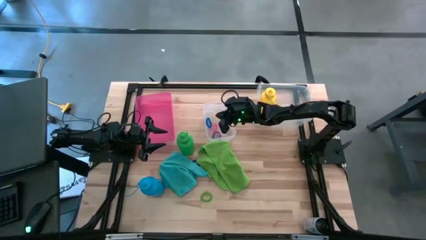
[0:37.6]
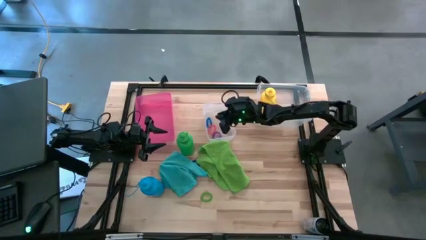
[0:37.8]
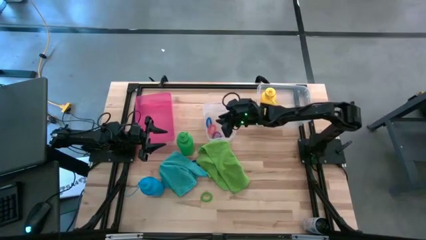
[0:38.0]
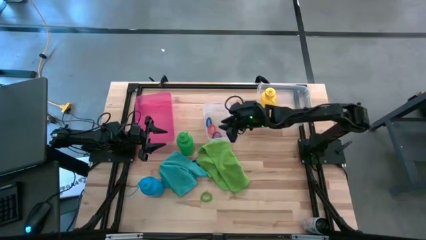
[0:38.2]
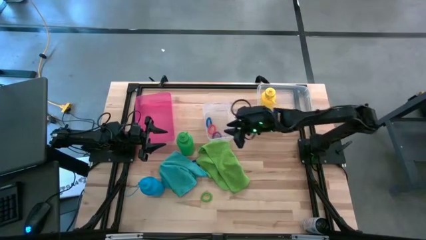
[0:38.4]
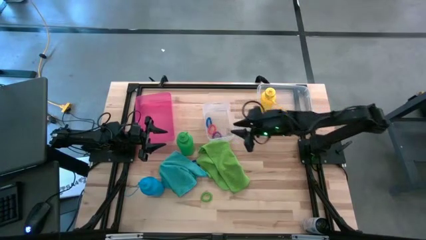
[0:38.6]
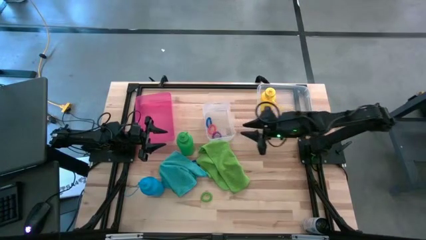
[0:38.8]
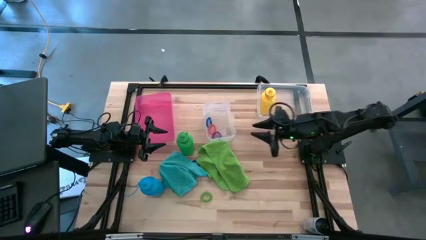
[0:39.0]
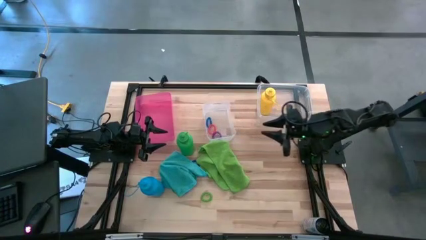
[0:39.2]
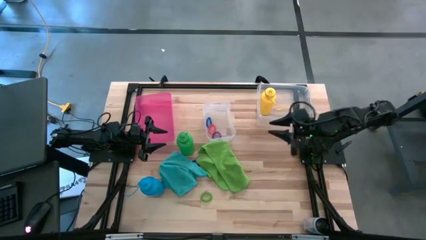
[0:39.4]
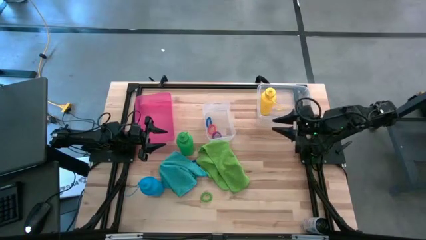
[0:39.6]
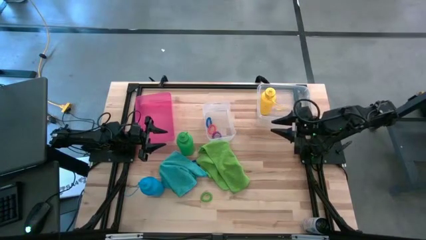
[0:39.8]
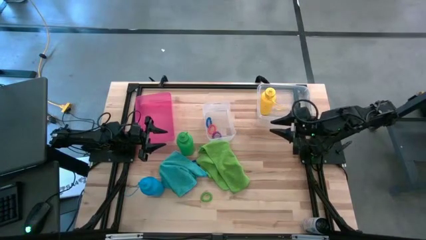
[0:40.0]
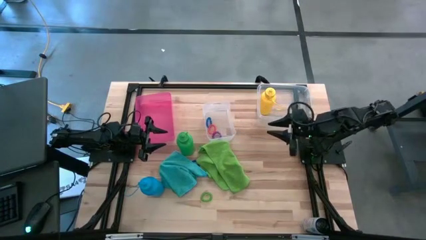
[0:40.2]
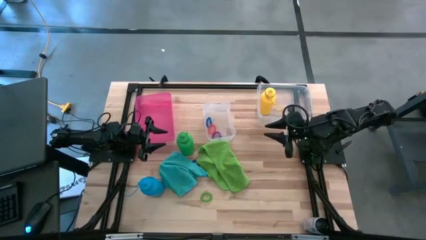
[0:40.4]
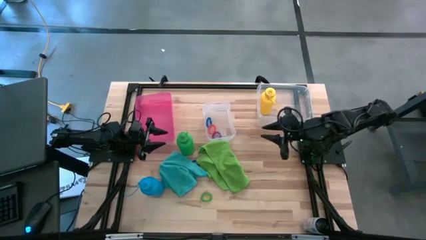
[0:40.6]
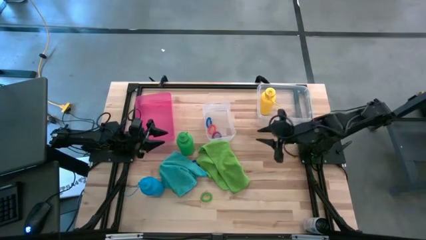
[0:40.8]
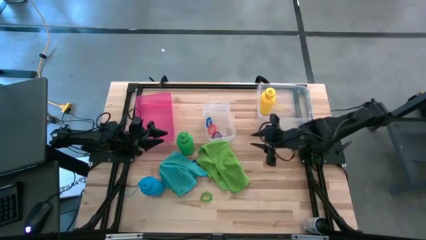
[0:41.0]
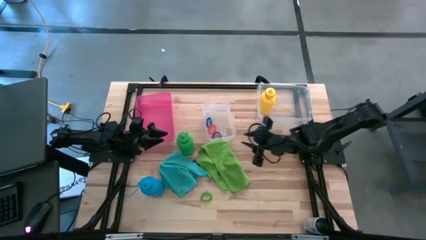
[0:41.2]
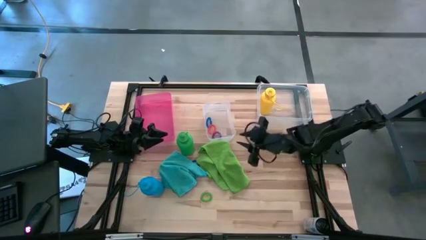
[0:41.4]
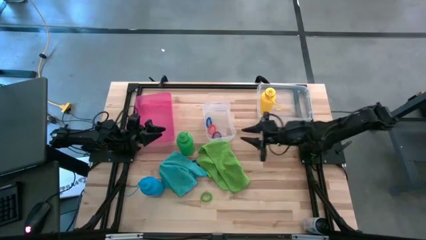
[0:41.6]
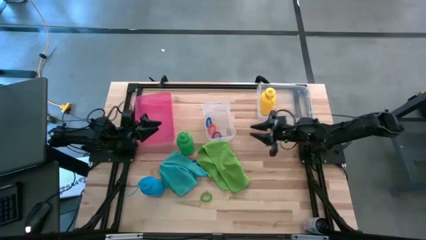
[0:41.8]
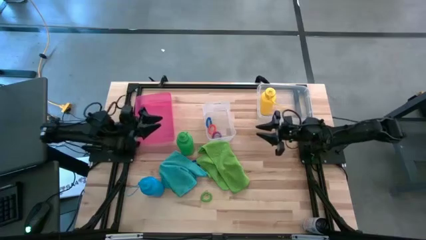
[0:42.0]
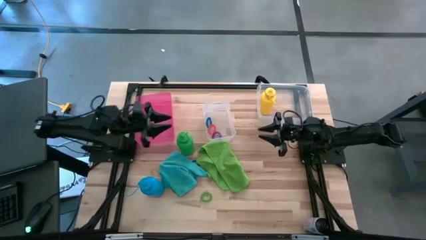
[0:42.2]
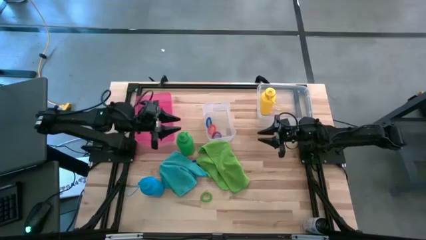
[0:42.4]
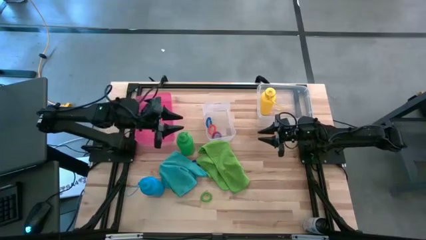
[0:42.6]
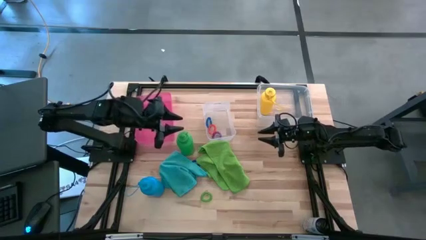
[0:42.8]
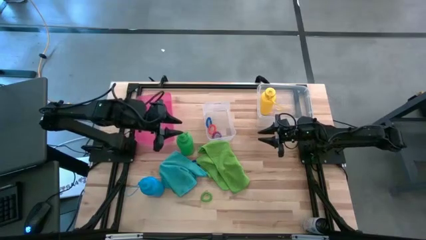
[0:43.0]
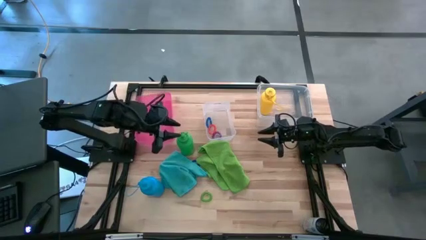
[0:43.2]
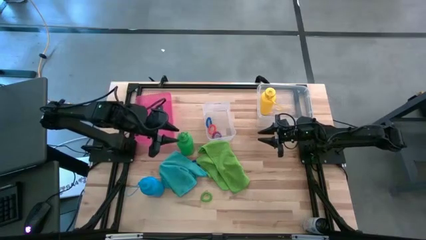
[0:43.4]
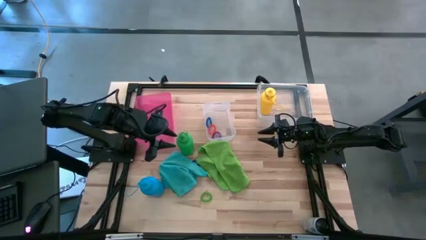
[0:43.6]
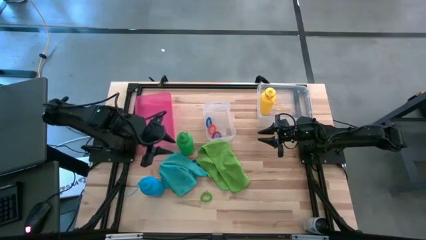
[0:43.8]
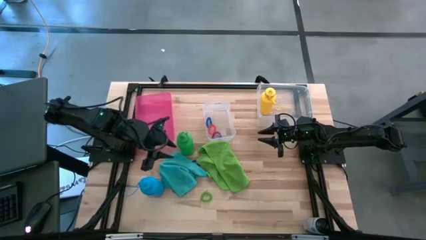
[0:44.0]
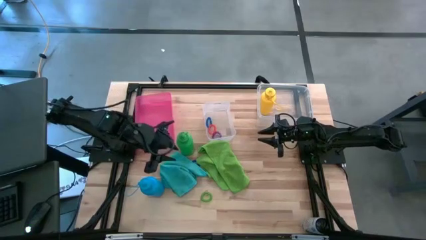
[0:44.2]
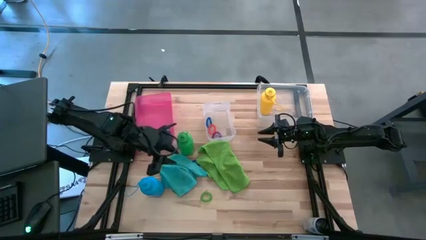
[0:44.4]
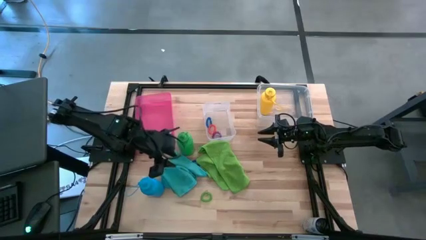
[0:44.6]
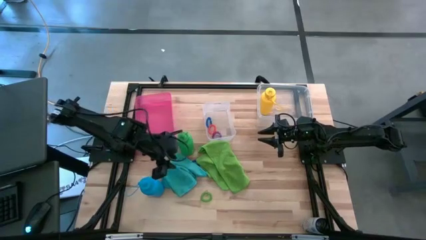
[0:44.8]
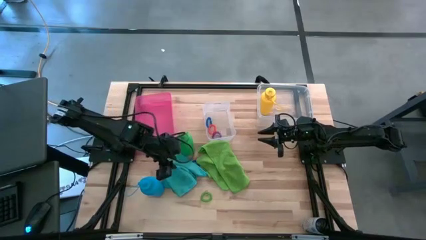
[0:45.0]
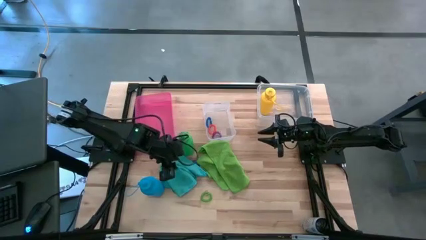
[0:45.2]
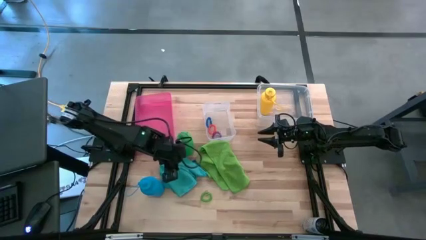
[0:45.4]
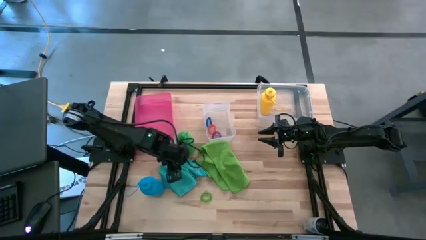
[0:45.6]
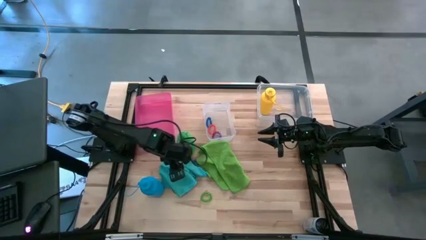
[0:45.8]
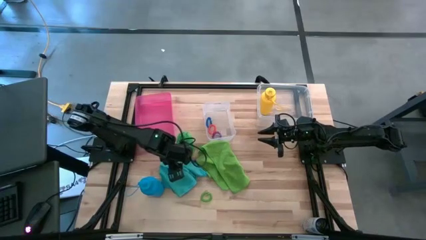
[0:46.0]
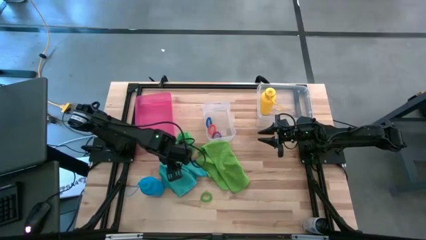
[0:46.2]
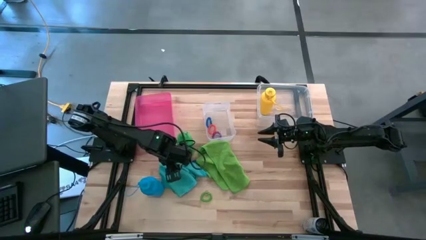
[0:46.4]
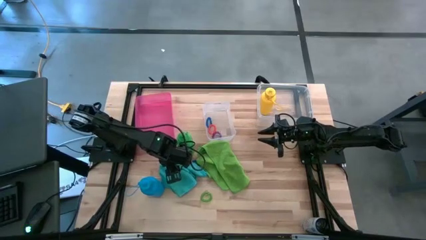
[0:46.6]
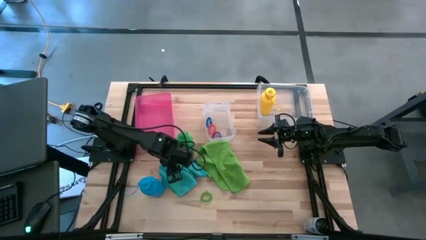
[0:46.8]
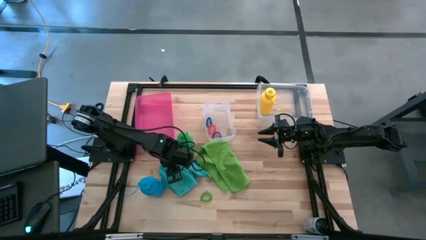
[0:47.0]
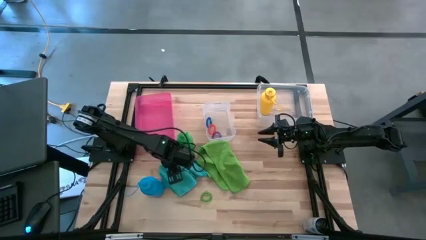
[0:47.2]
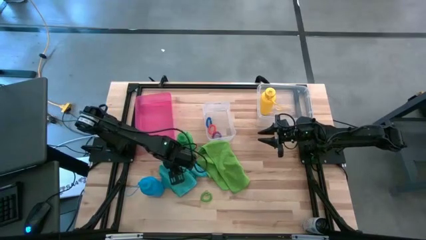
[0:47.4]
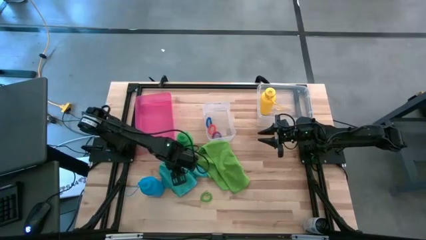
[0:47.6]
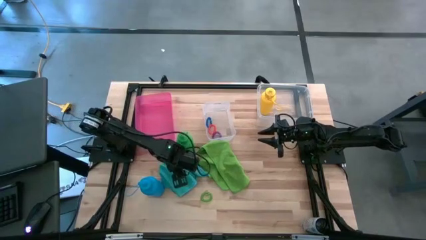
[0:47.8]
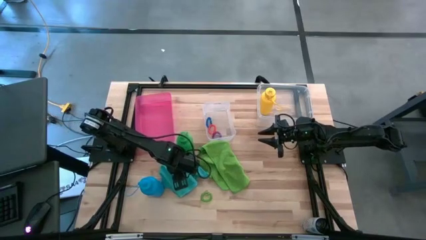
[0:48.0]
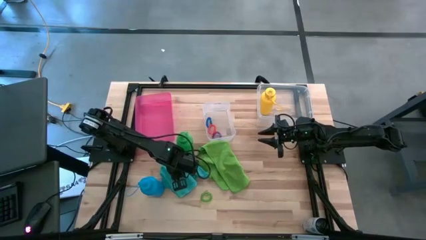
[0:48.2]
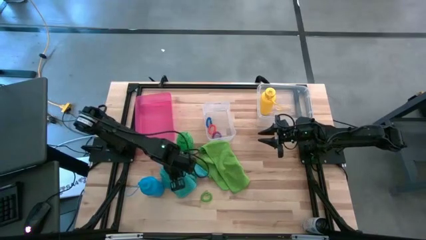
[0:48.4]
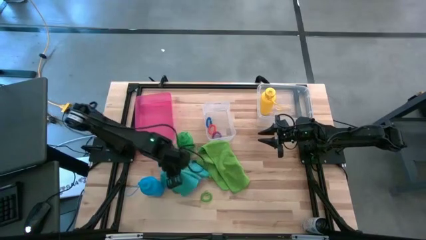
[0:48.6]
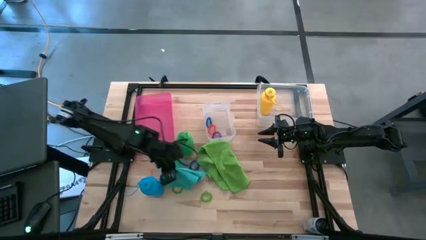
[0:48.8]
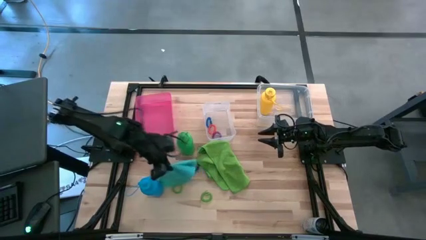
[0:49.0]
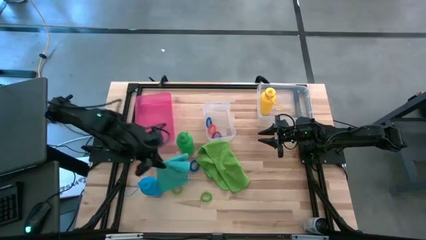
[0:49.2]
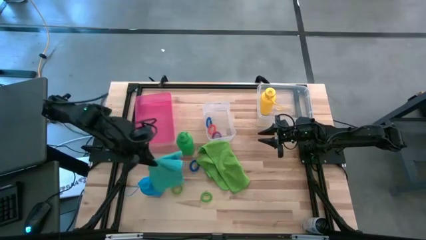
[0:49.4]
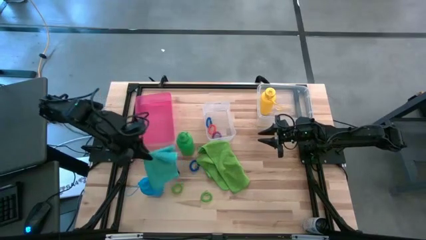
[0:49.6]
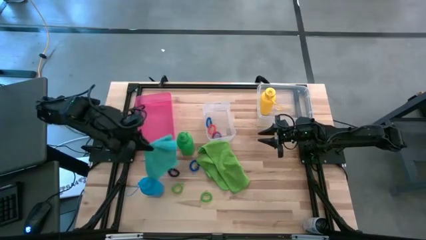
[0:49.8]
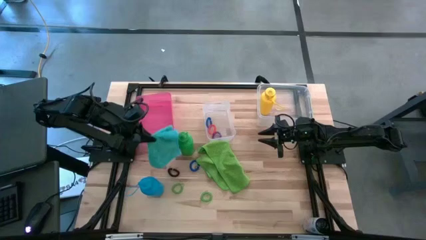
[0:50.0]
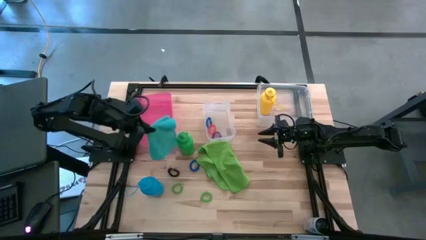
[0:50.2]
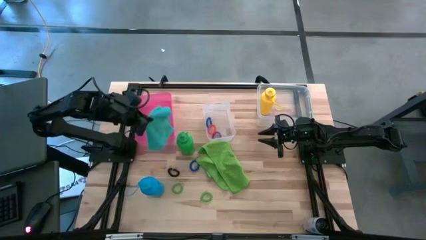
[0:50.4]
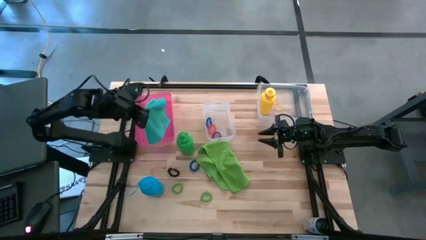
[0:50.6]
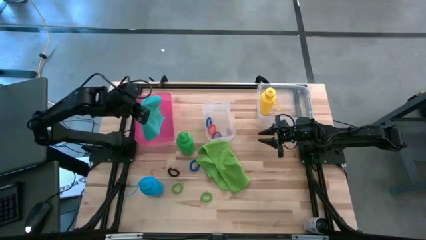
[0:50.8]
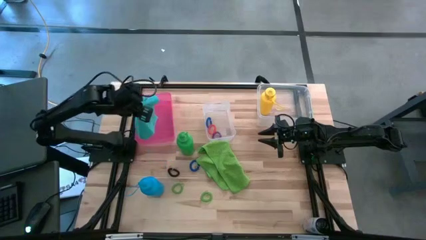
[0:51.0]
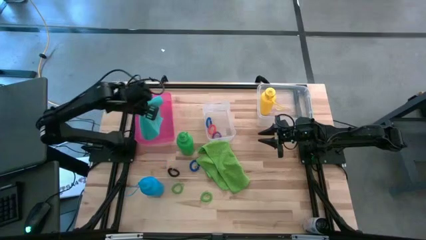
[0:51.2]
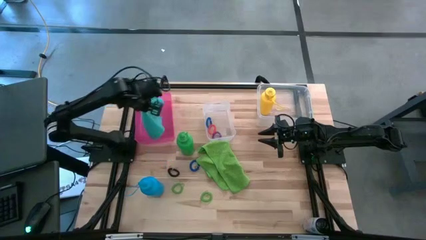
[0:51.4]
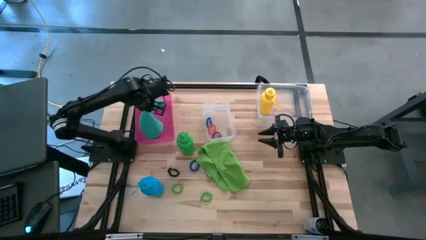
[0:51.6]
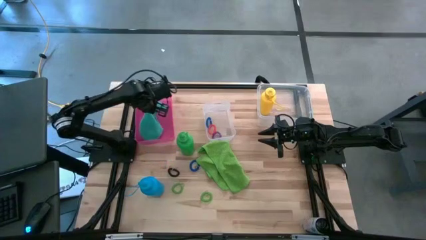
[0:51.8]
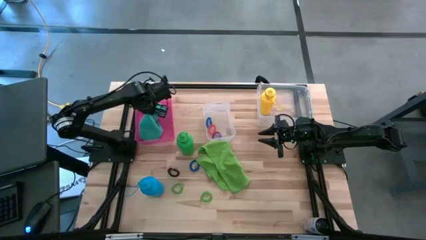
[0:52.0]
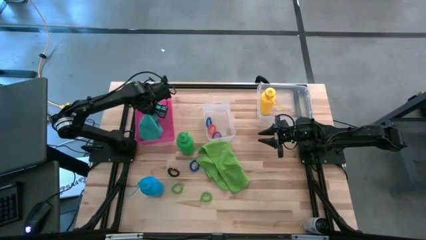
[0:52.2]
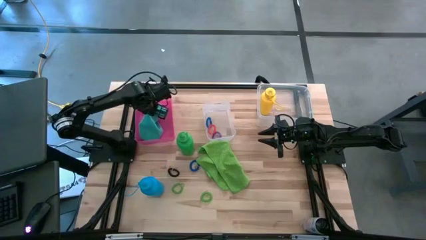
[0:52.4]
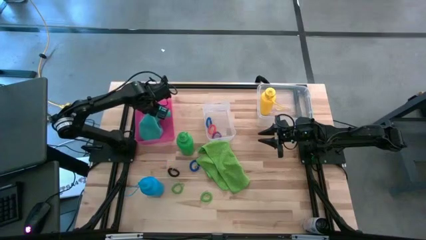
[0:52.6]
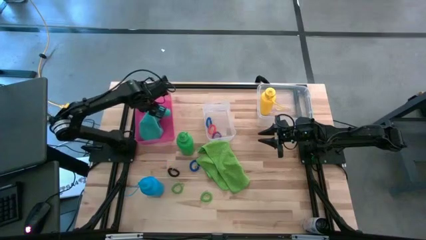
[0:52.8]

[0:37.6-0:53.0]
Task: Pick & Place Sports Items
Put the blue microfiber towel into the red bin

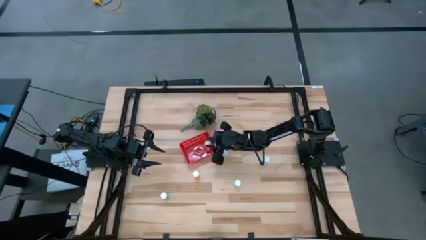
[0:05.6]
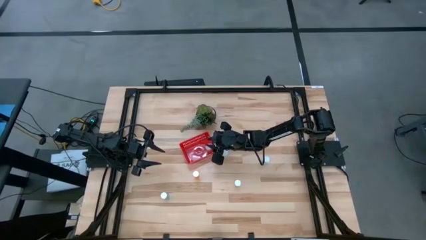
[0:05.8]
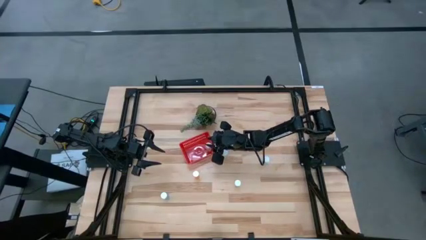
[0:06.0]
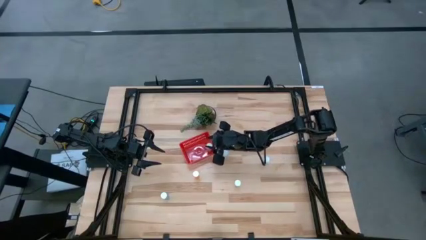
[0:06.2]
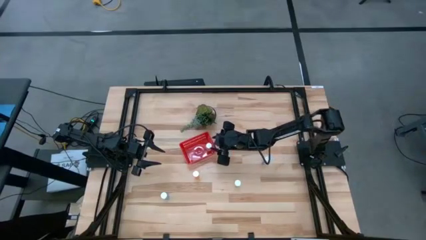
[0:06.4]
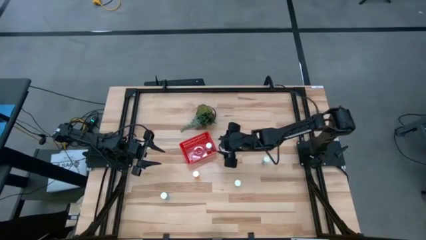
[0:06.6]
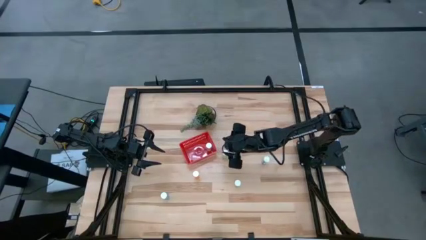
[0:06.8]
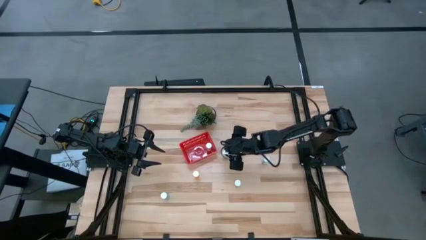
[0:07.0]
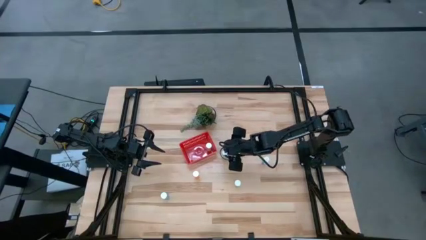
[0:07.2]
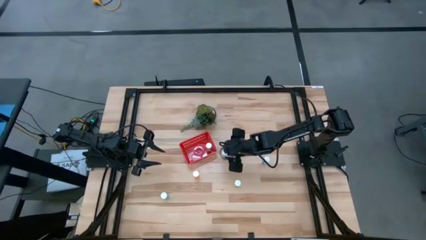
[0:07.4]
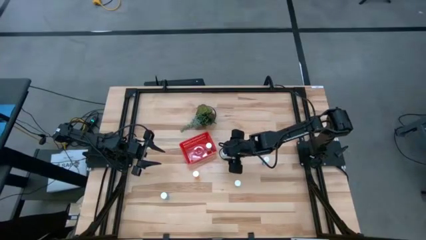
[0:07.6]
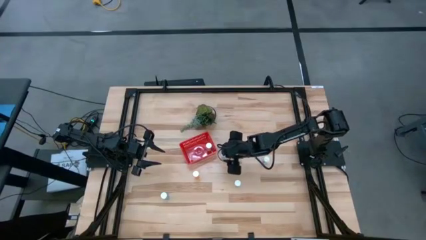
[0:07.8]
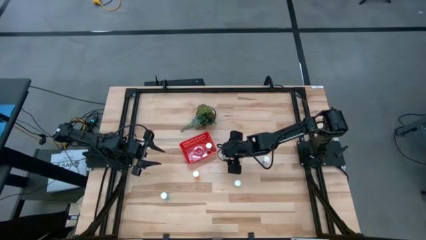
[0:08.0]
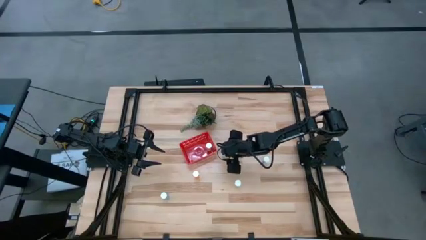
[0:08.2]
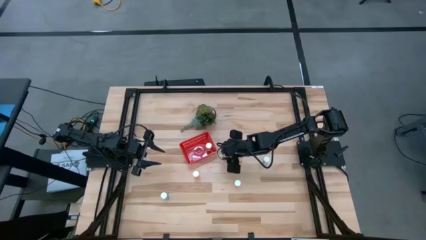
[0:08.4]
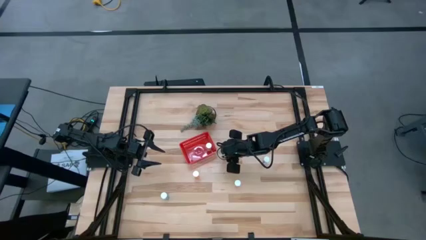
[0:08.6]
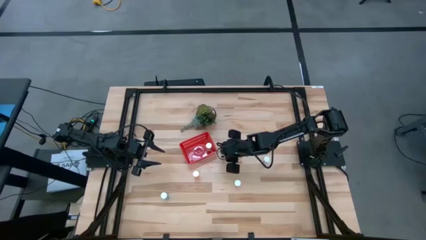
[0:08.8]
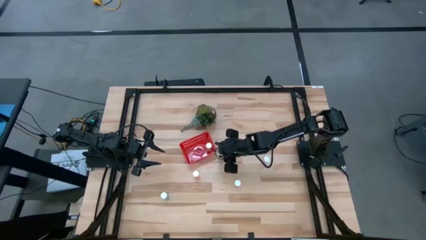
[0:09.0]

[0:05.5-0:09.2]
Task: Pick and place pill bottles into a basket
Put the green pill bottle into the red bin
